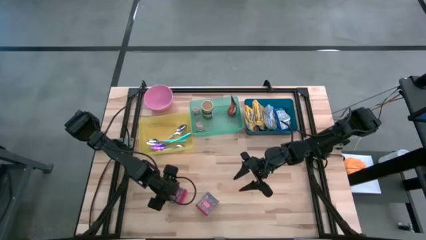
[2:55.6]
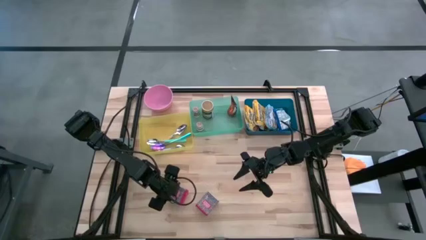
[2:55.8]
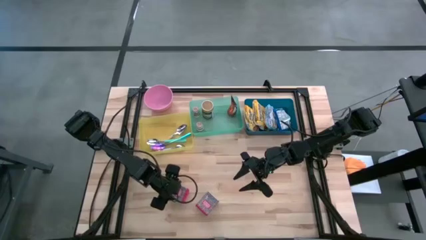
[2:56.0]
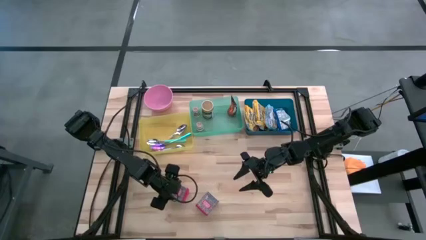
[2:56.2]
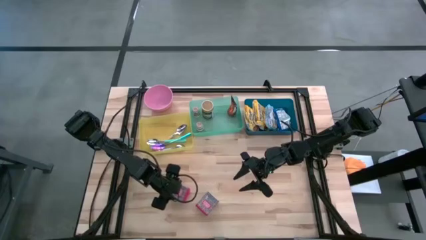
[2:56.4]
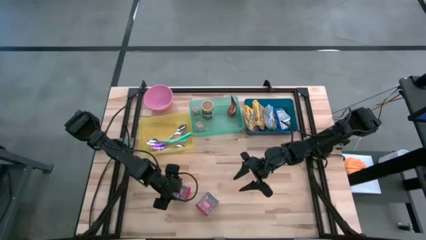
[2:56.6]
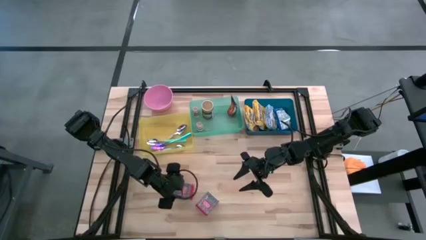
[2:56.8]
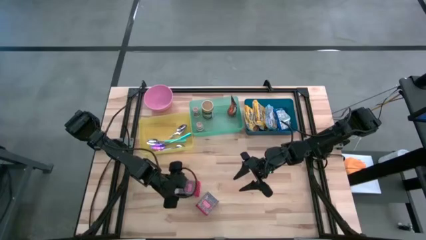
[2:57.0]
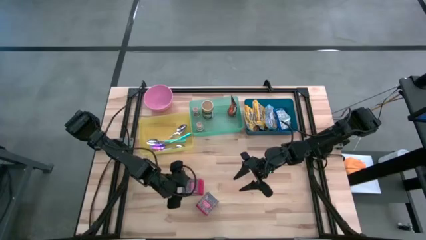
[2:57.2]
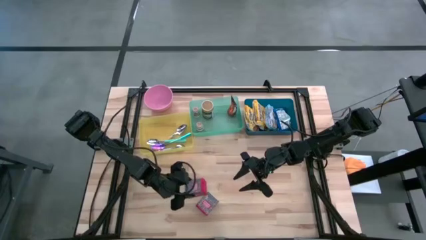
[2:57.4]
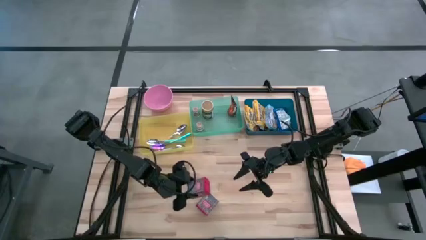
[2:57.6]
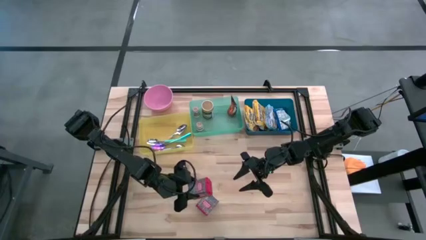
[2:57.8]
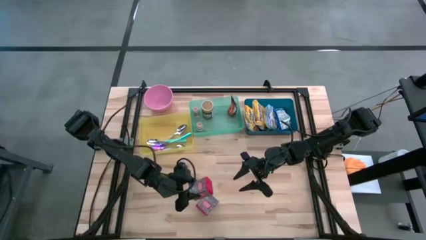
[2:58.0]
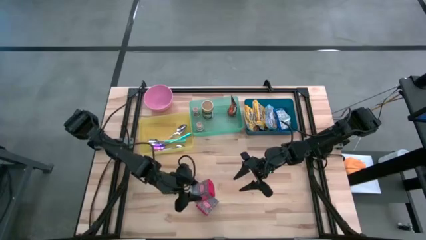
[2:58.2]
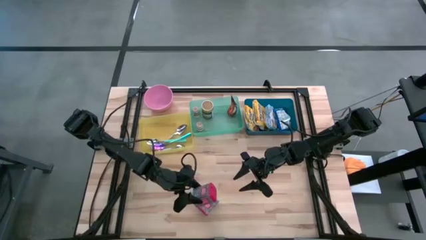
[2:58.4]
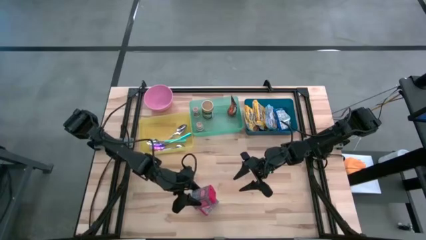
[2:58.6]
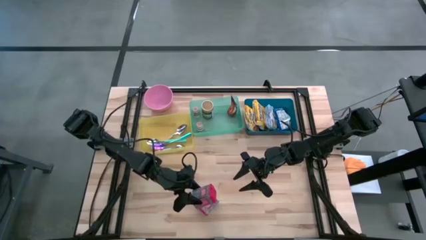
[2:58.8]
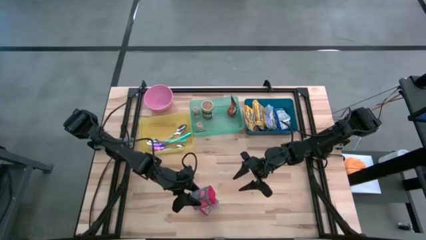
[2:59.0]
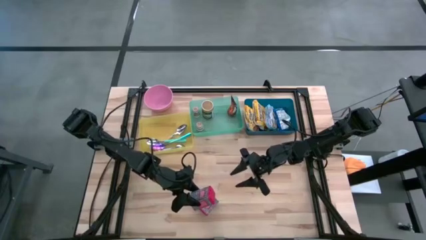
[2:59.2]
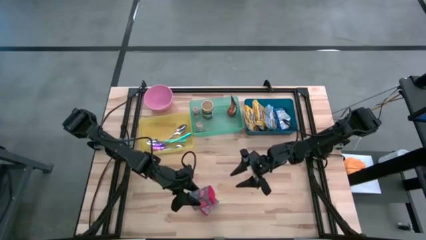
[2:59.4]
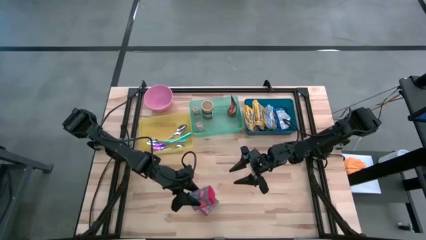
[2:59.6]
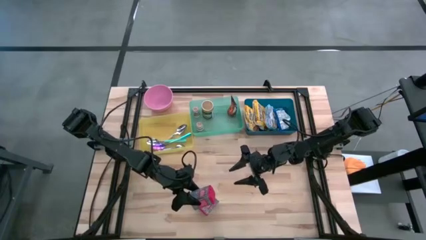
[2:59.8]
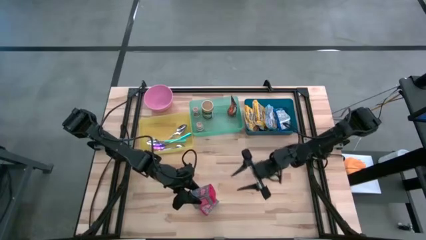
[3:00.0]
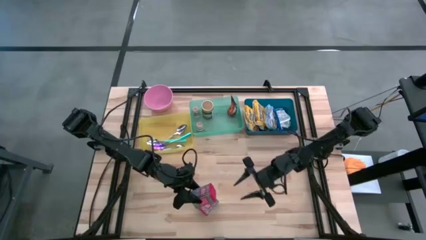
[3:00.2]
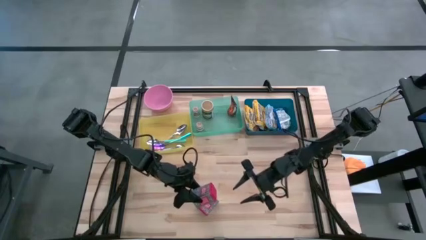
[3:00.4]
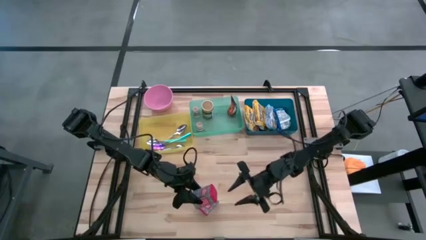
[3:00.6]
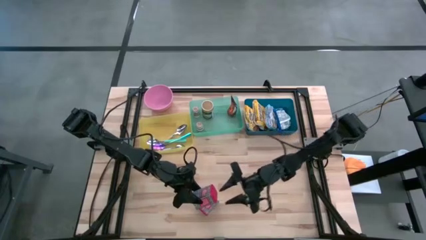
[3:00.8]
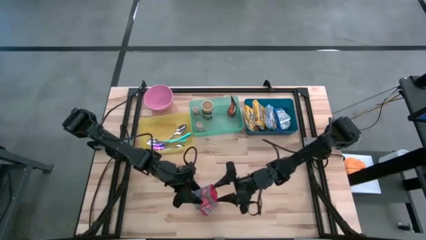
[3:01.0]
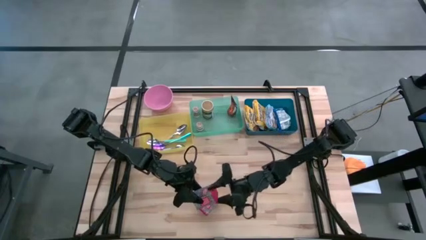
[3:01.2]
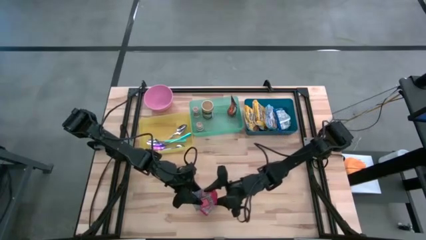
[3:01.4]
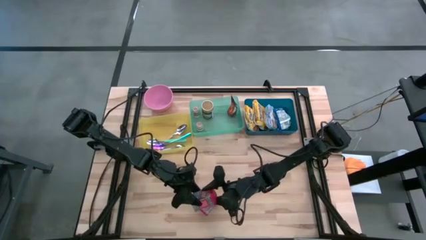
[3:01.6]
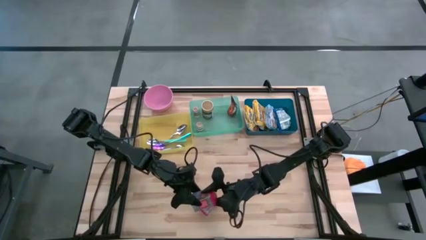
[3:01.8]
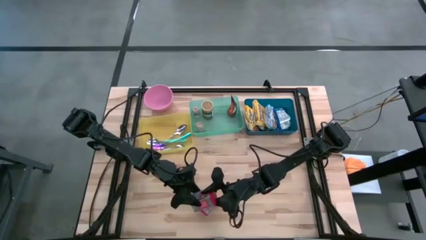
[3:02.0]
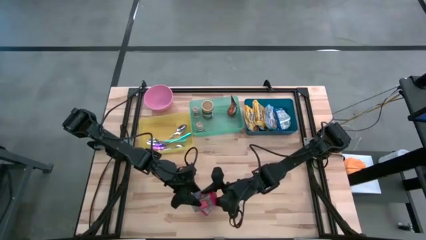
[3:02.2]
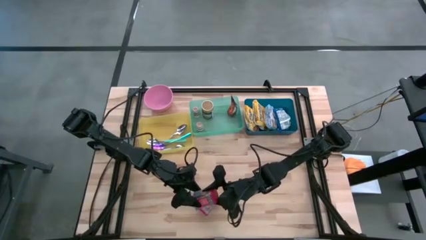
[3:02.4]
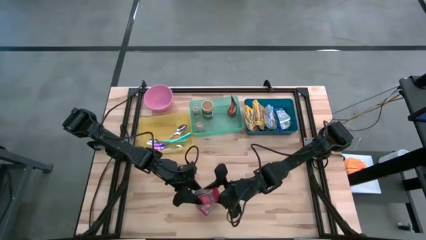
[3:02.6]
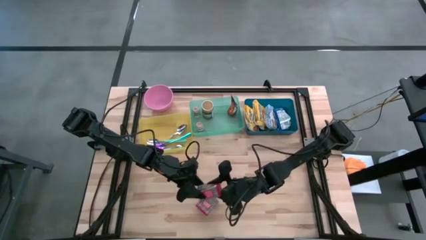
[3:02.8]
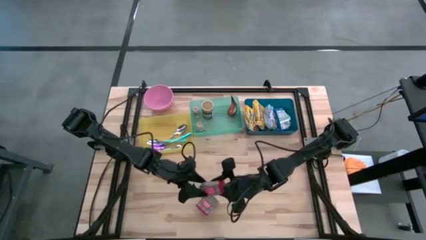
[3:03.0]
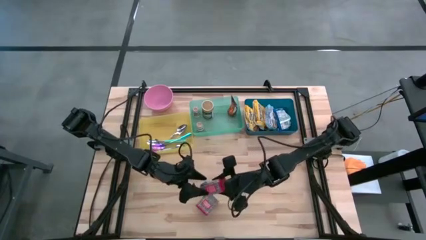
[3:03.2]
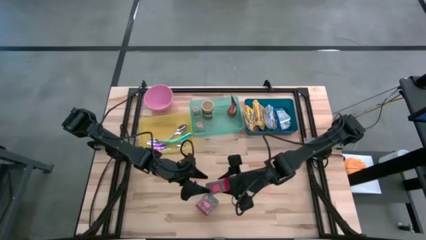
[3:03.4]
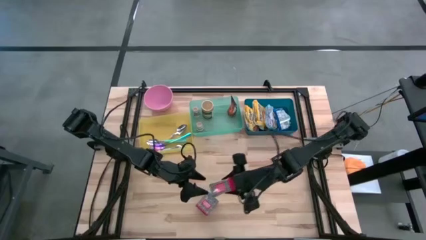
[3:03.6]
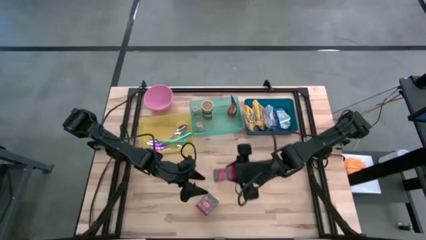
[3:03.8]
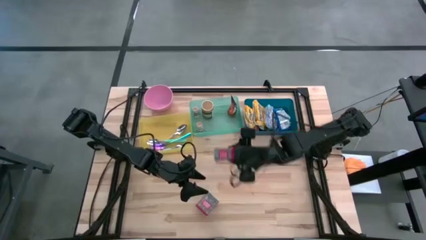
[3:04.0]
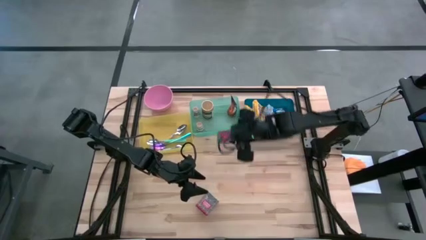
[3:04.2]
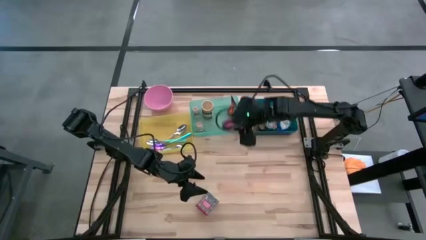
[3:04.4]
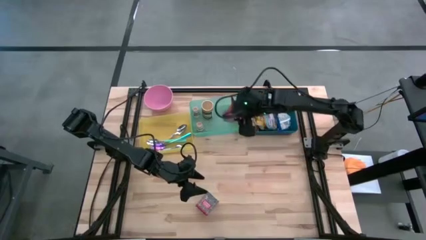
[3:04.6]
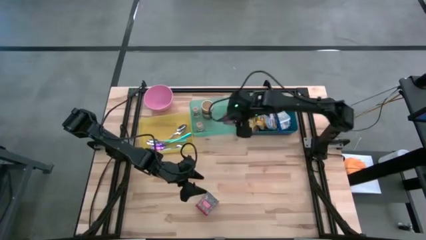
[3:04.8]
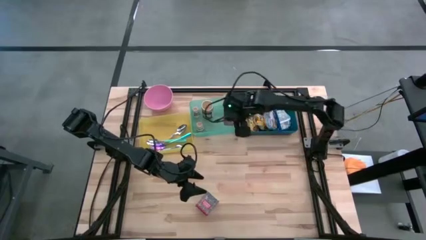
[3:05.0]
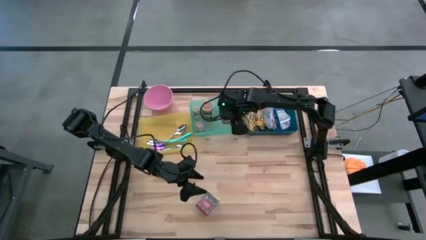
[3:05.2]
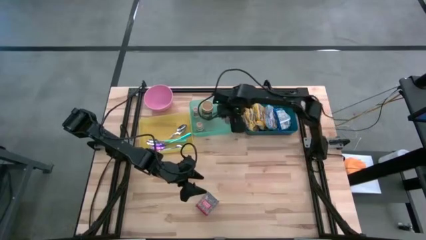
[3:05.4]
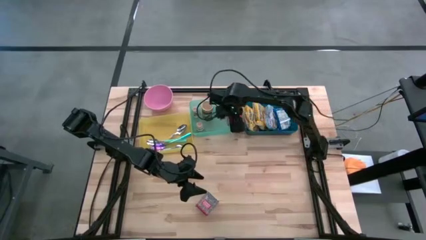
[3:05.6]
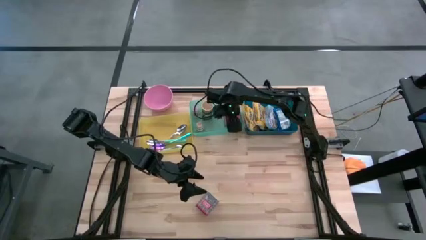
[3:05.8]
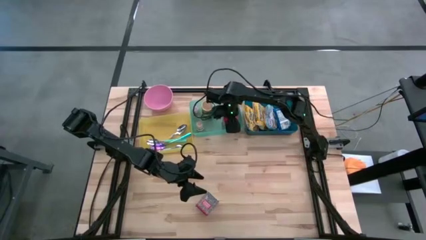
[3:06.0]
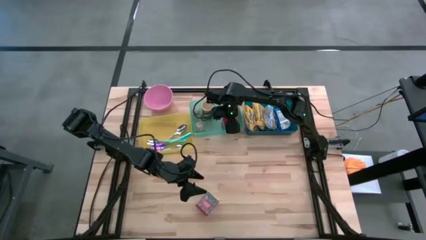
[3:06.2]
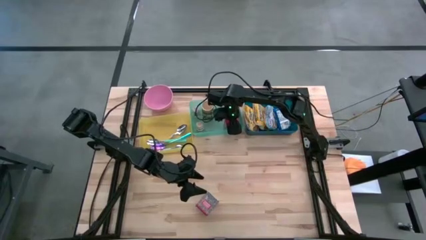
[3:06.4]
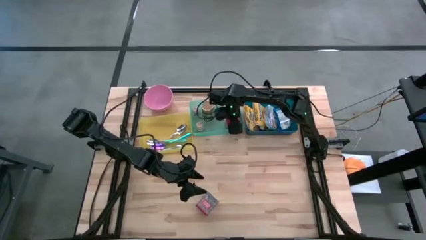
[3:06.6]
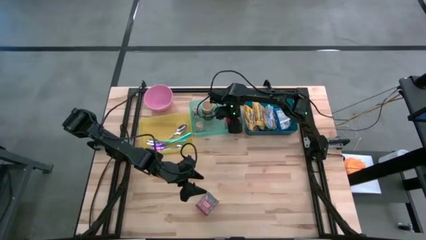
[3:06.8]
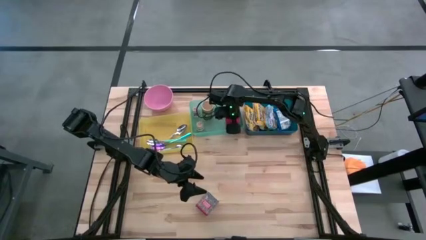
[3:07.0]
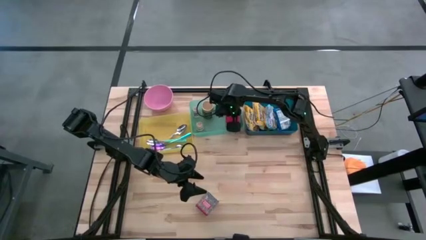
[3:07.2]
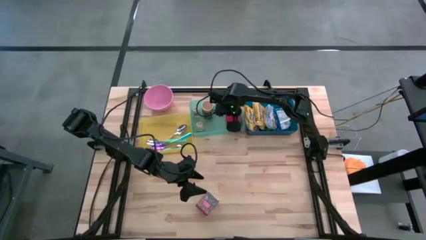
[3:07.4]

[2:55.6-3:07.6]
Put the left red seasoning can into the green bin
